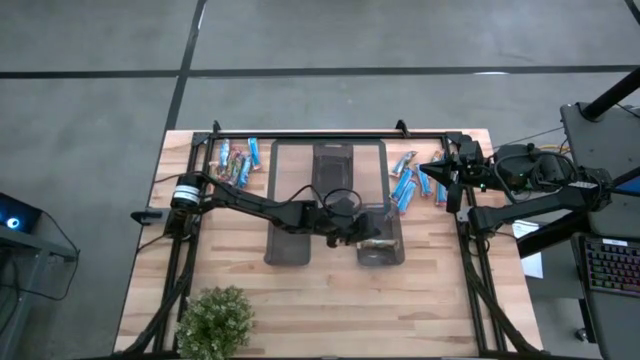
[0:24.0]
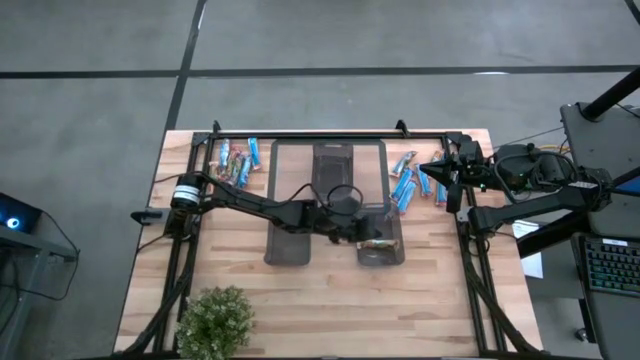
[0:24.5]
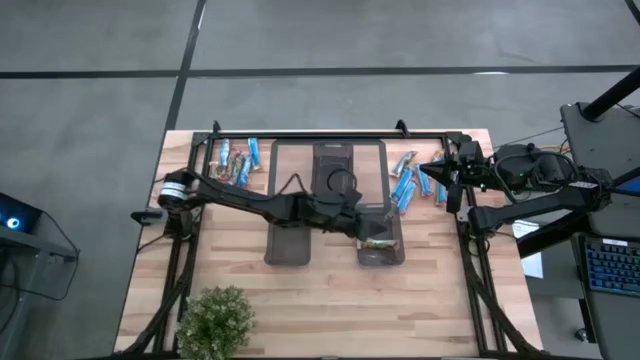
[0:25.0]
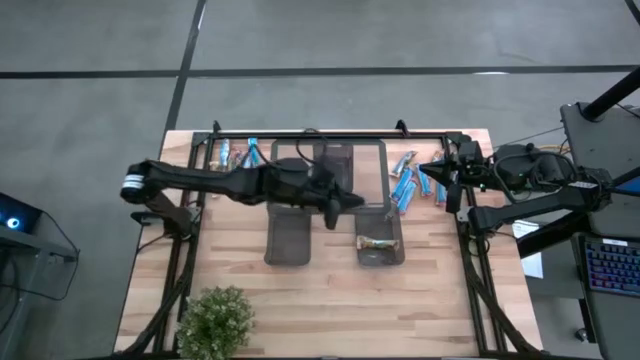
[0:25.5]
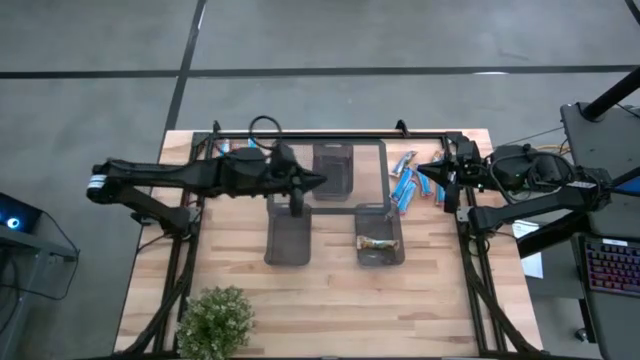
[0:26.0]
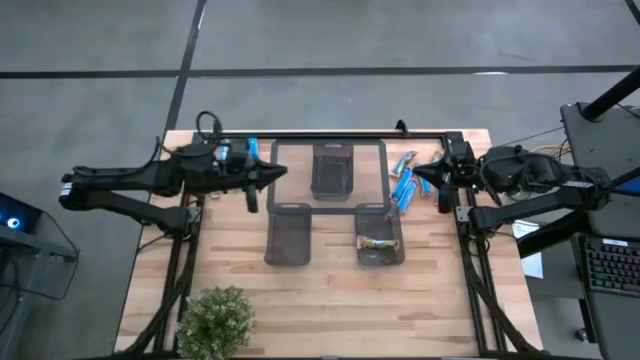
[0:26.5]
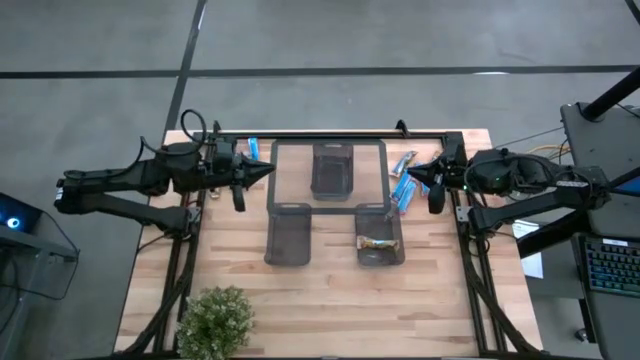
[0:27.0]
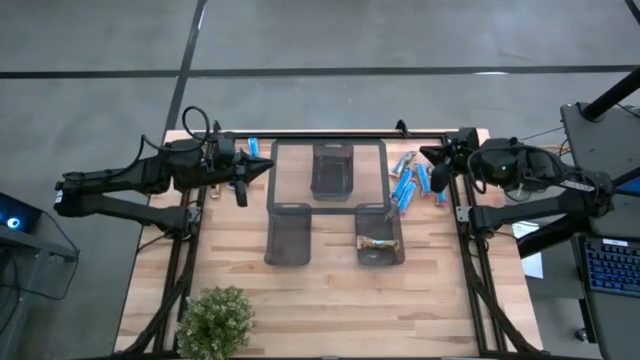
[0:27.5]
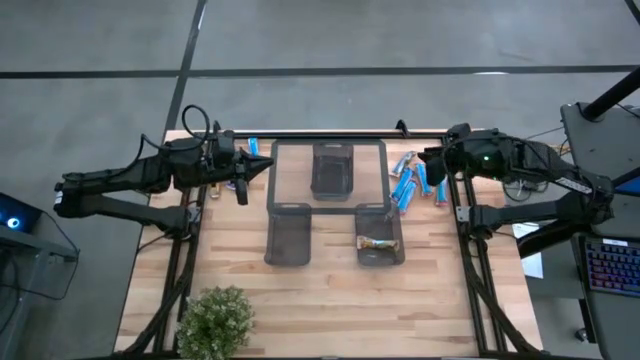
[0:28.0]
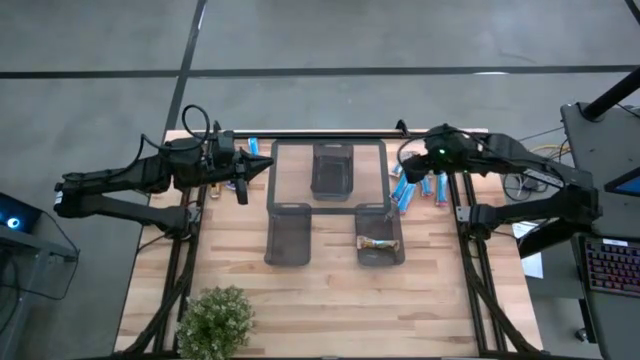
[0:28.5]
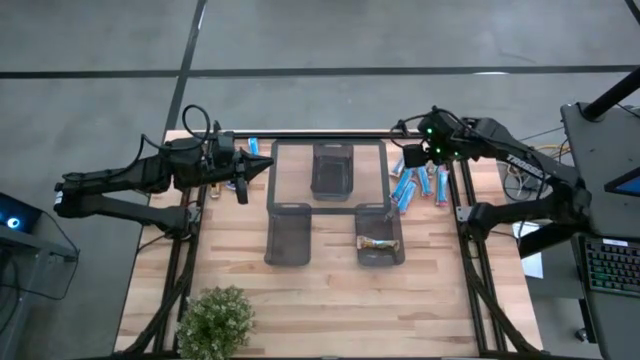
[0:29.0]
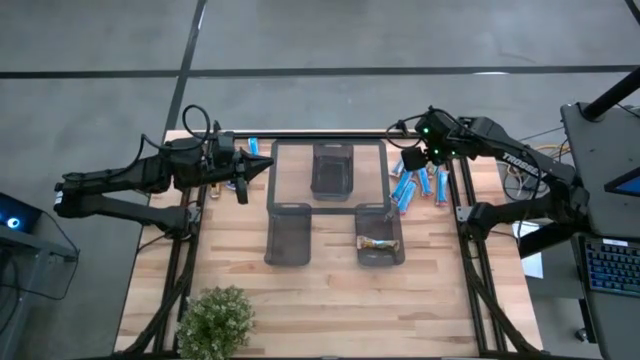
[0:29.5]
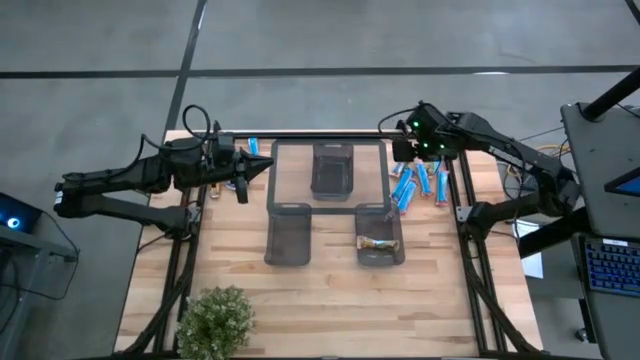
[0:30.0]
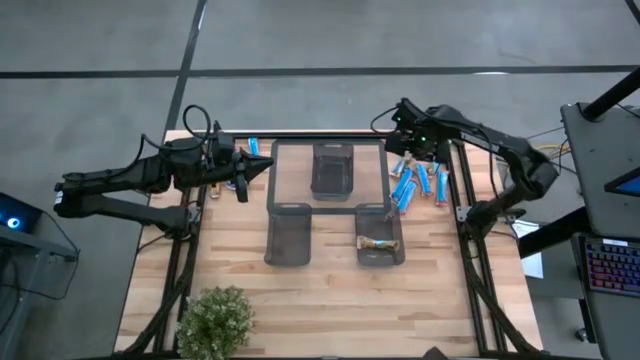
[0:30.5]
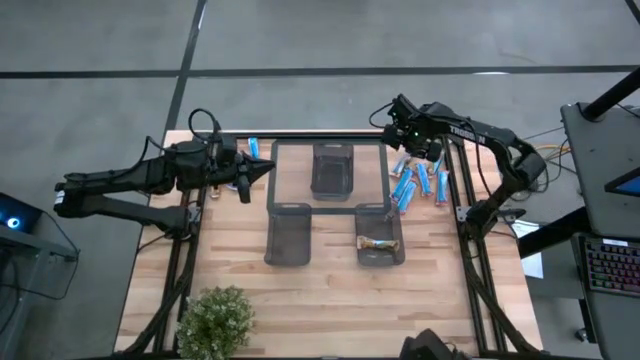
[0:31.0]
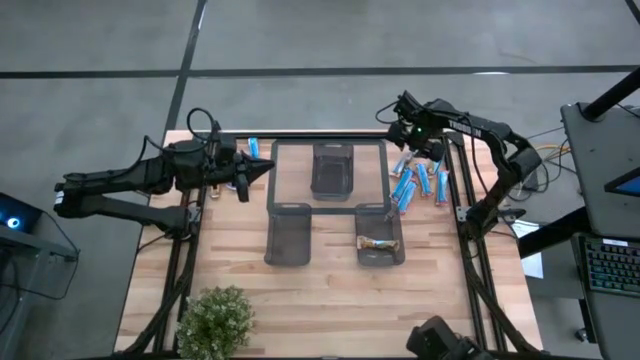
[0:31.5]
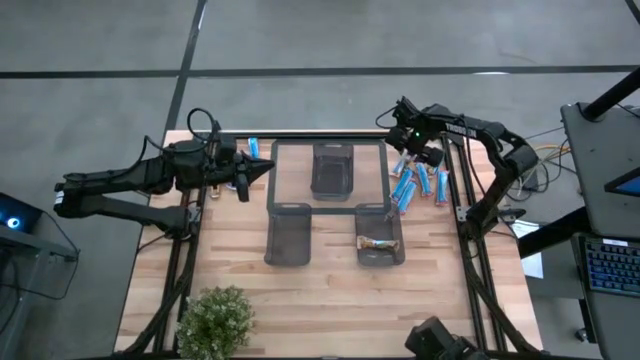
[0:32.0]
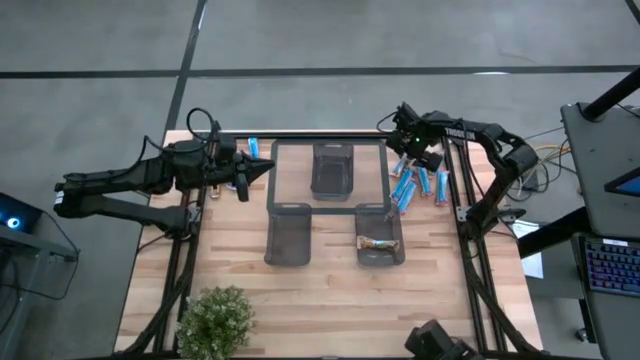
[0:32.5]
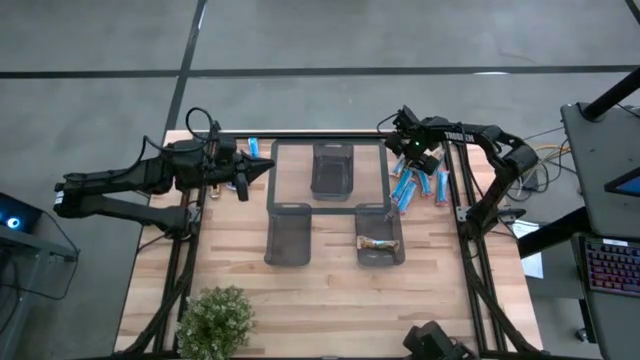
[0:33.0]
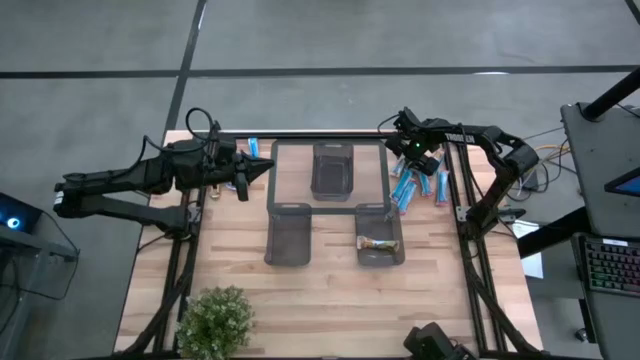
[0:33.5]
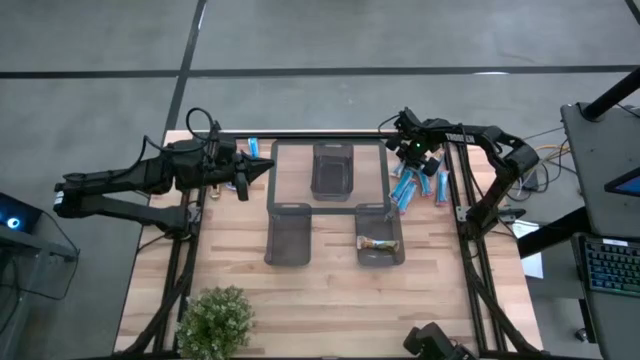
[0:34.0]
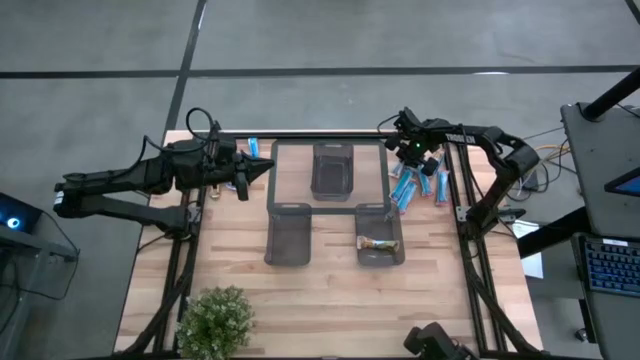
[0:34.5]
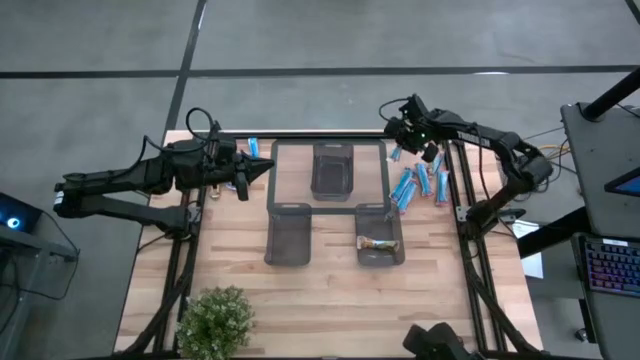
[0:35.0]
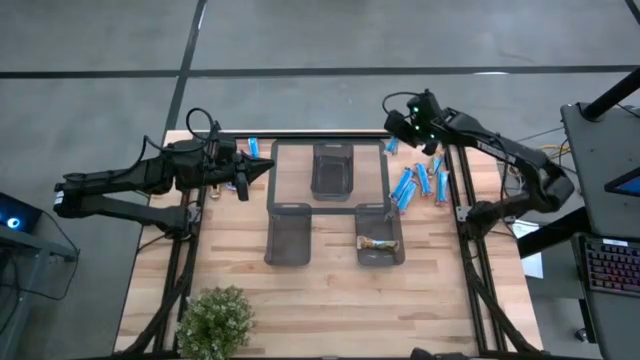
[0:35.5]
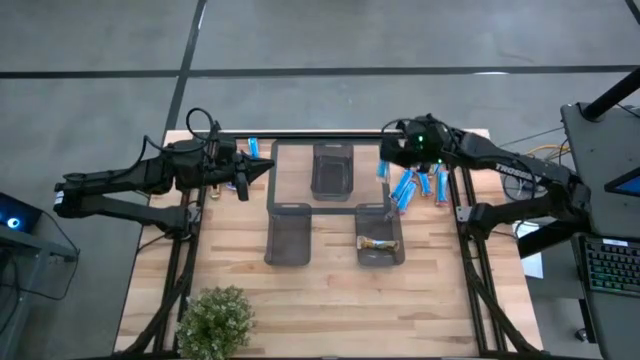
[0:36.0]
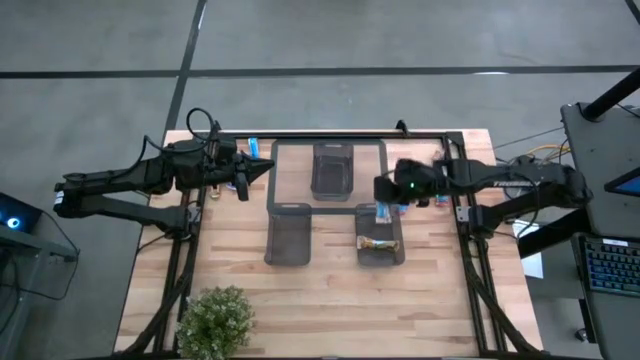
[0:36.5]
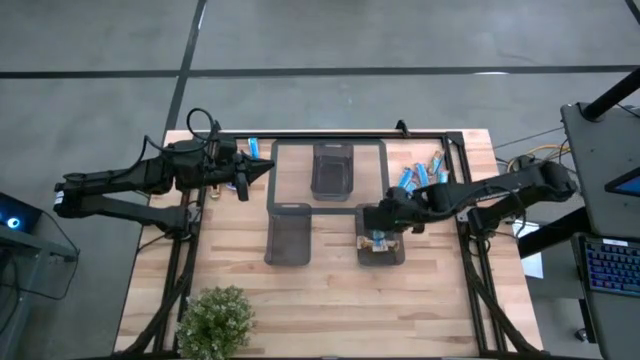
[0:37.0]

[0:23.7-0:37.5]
Task: Pick and place Granola Bars by type
Put the orange granola bar into the top right bin

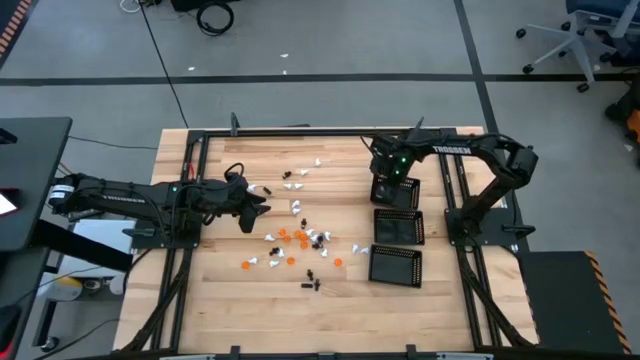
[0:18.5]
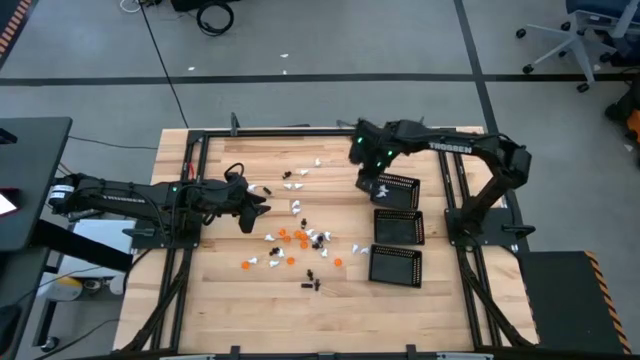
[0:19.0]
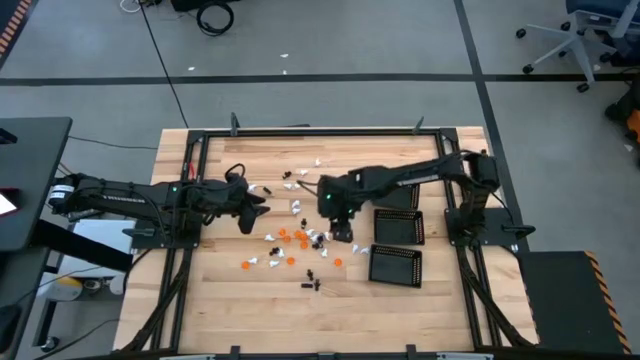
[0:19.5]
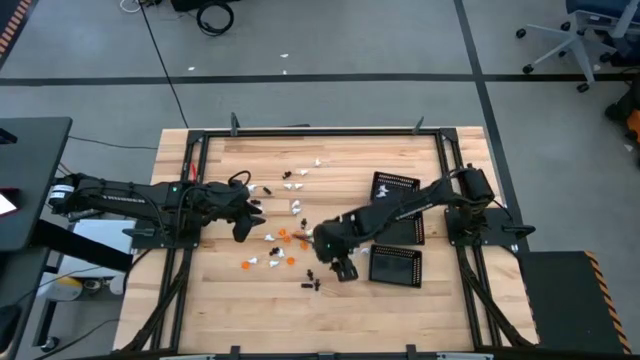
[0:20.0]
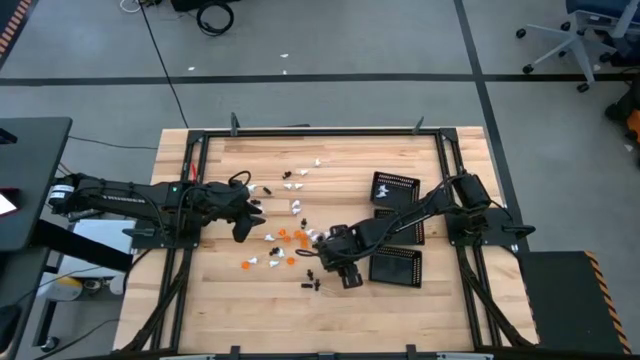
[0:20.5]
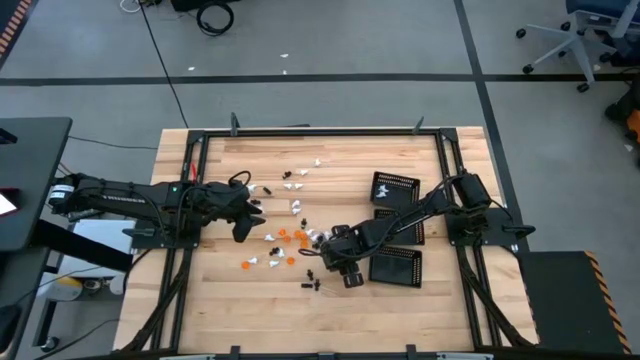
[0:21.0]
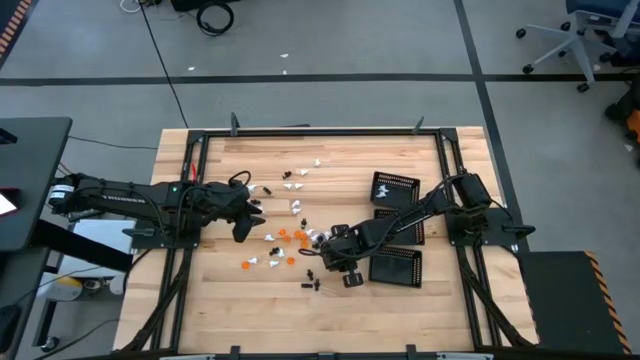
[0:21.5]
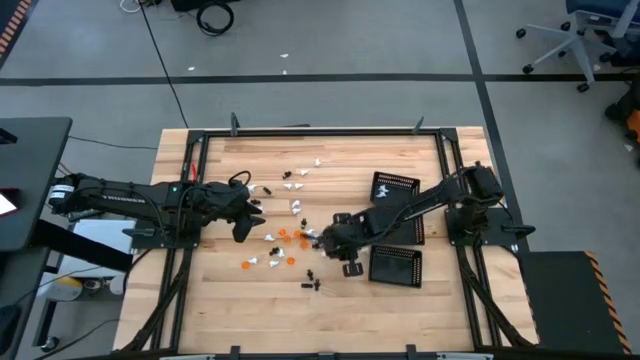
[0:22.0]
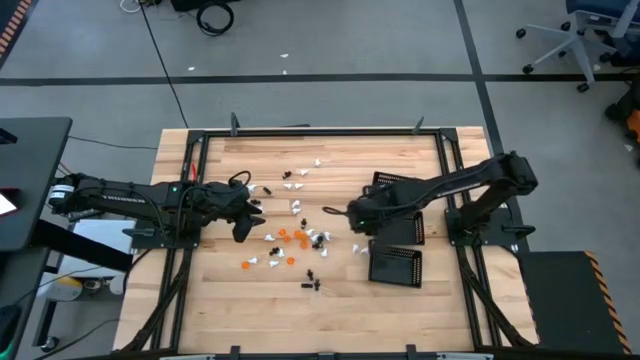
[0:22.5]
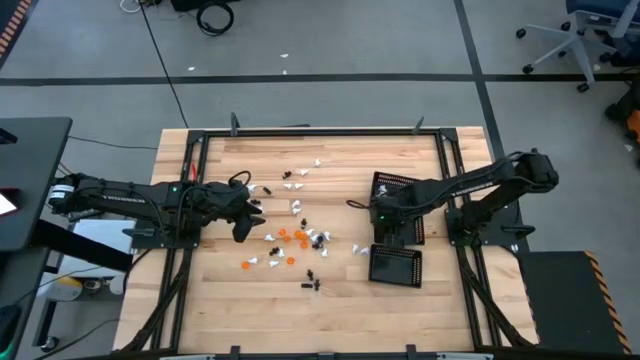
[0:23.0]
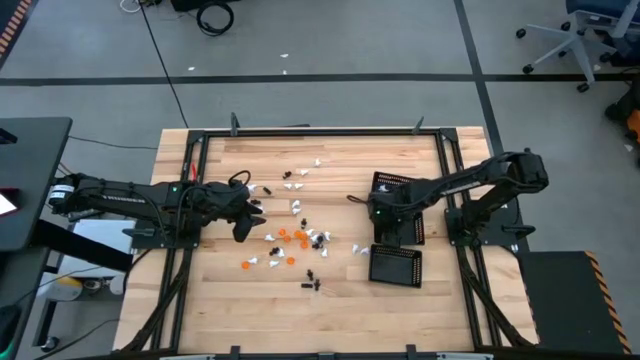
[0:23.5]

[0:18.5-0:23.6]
Task: Sort Halloween decoration
Put the orange pumpkin toy into the center black bin

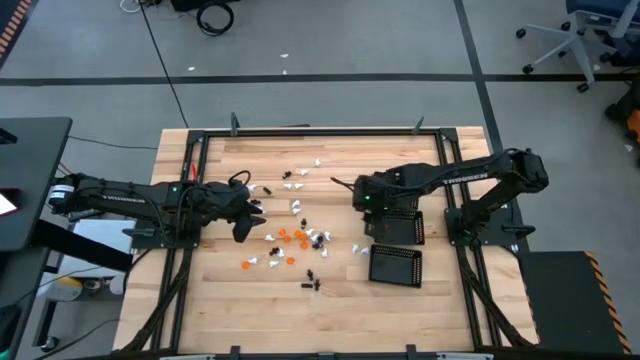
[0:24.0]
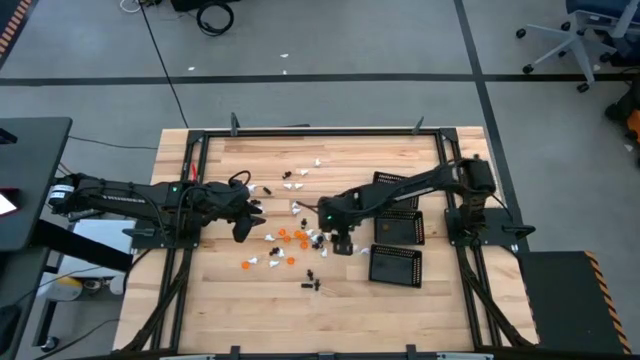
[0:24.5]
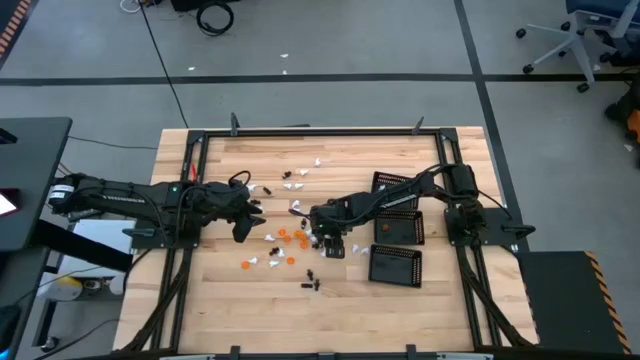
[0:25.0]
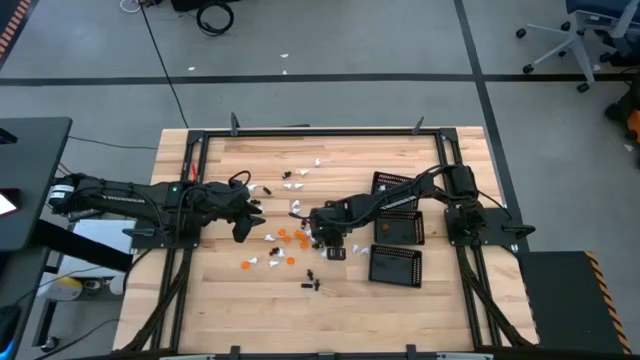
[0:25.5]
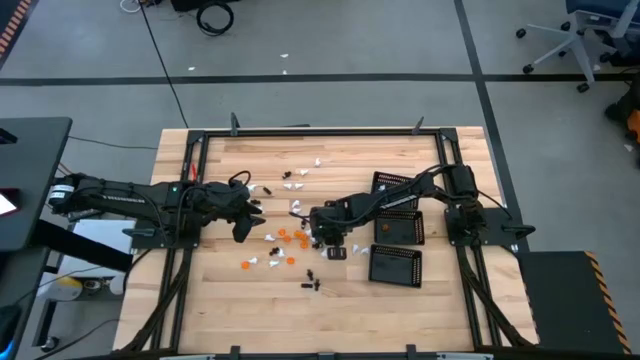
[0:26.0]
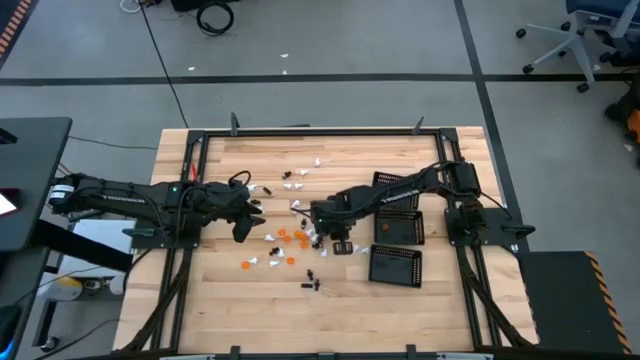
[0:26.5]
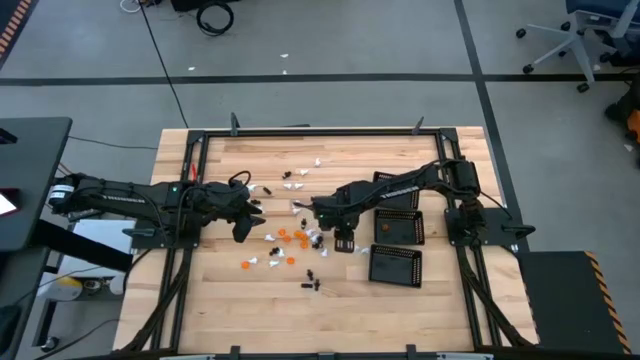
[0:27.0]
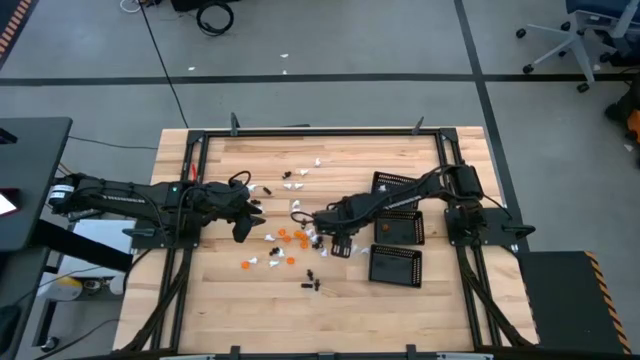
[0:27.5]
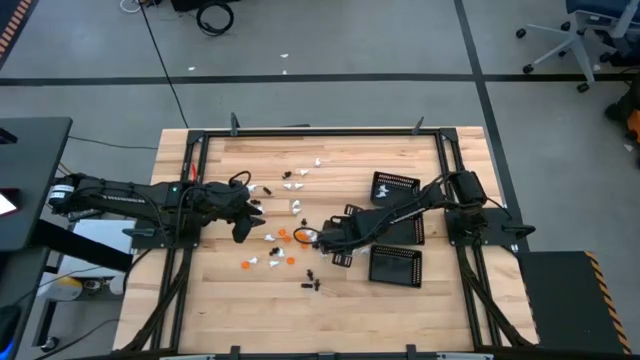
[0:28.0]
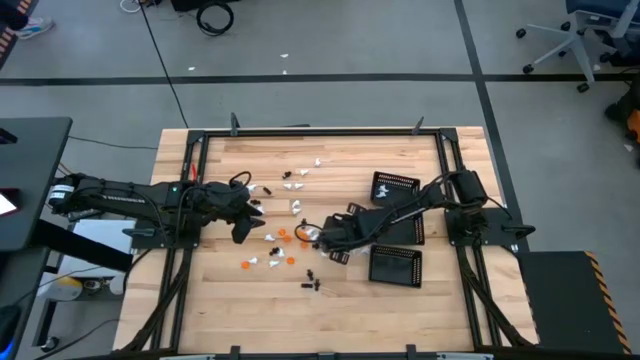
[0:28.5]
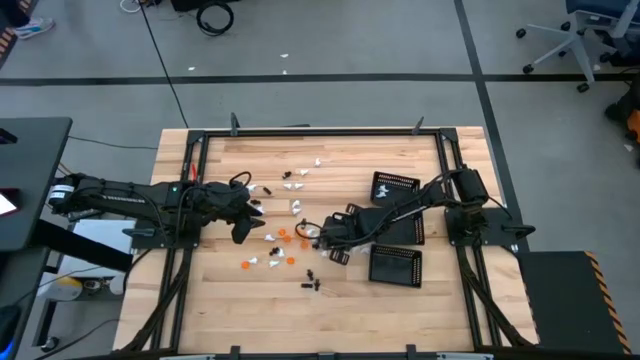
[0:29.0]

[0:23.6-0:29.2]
Put the white ghost toy into the top black bin
